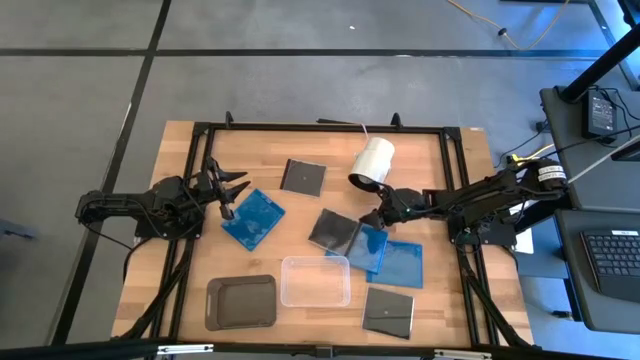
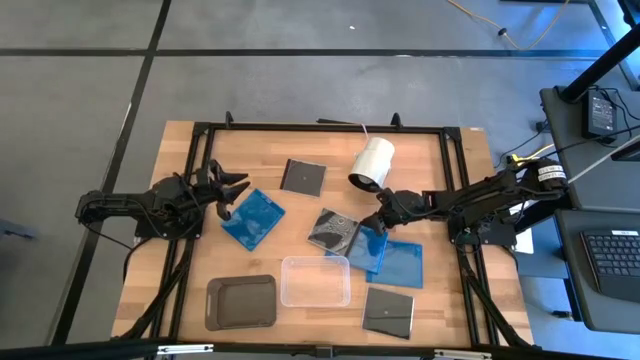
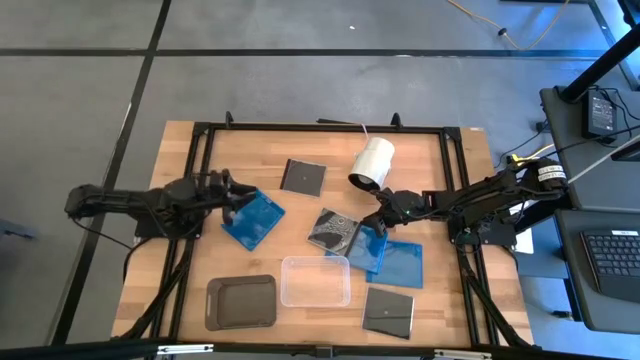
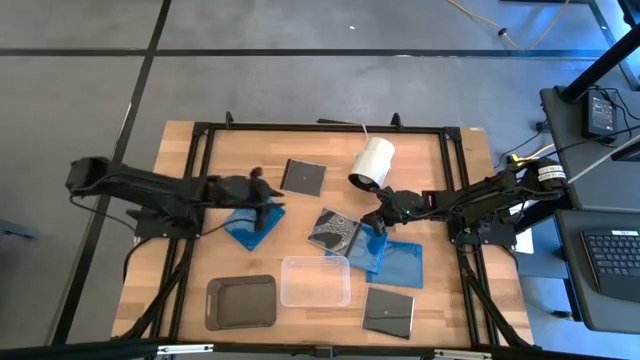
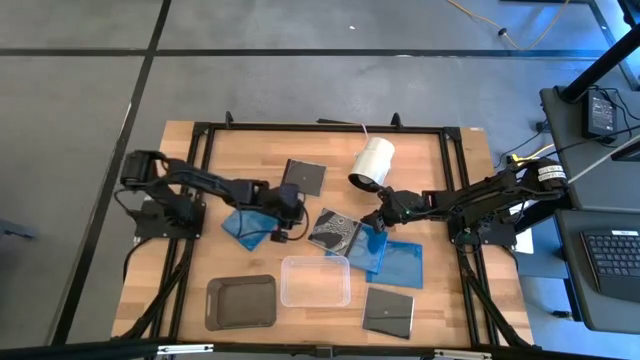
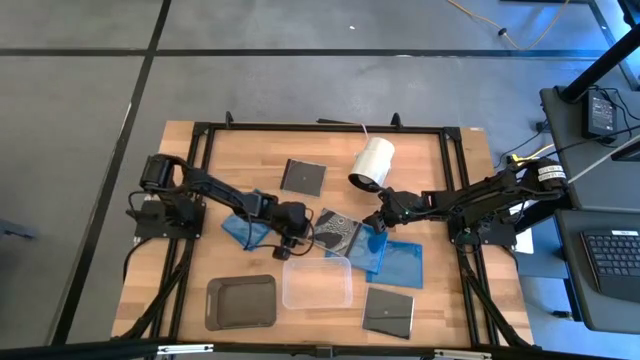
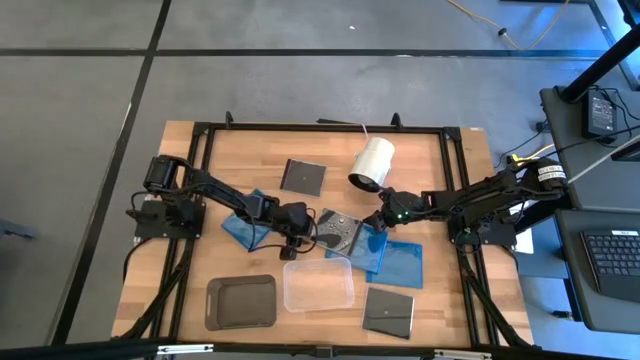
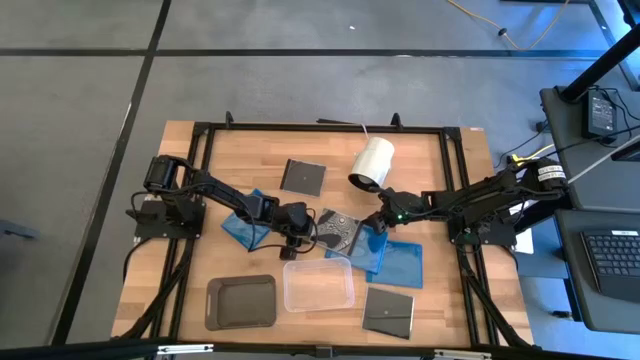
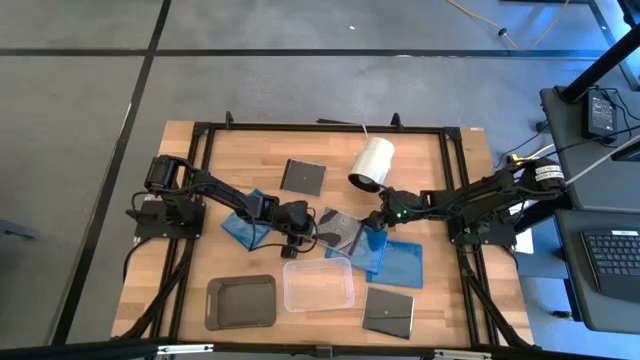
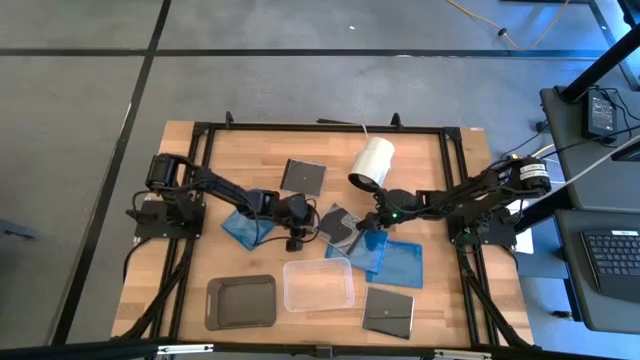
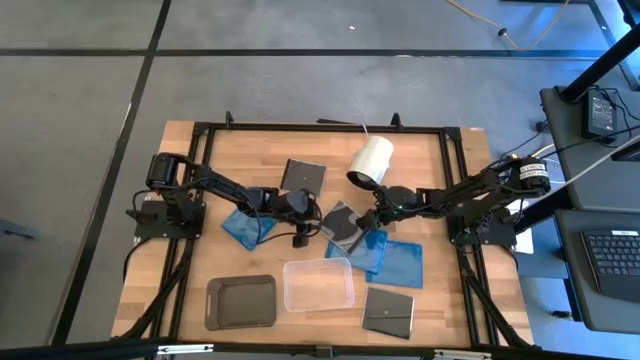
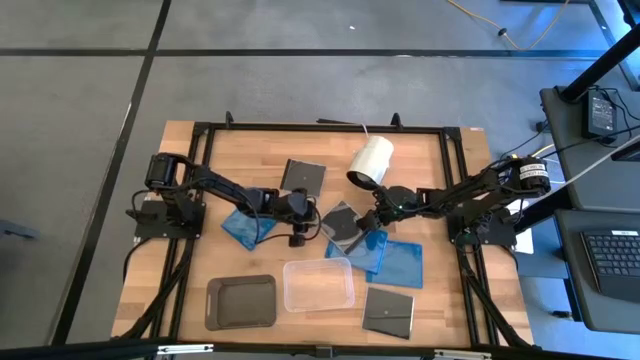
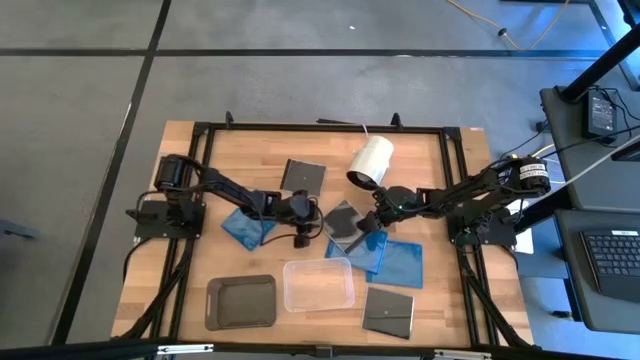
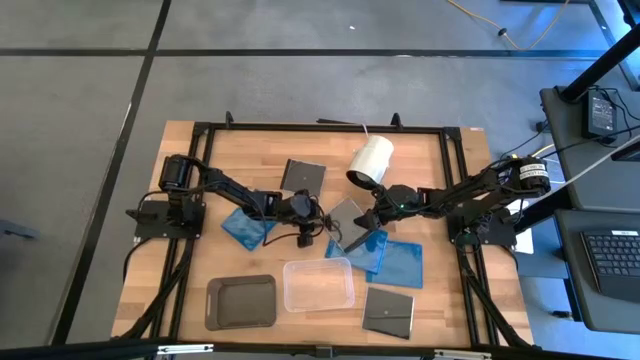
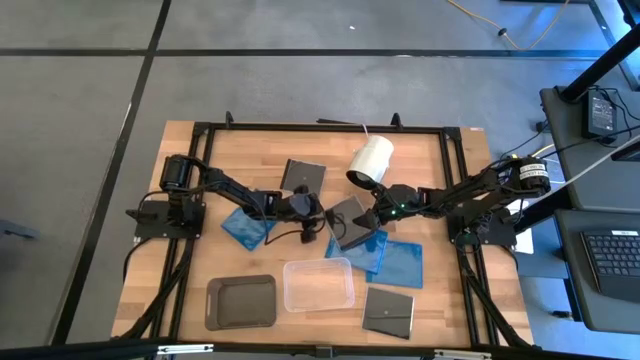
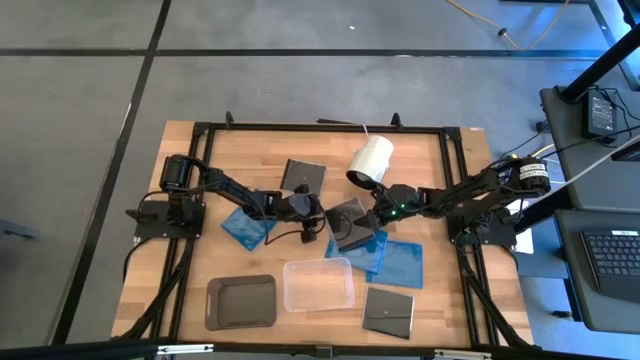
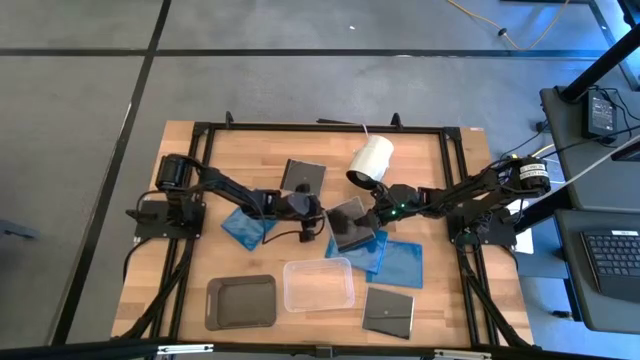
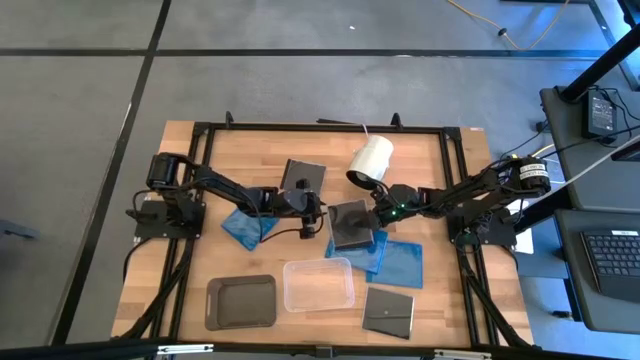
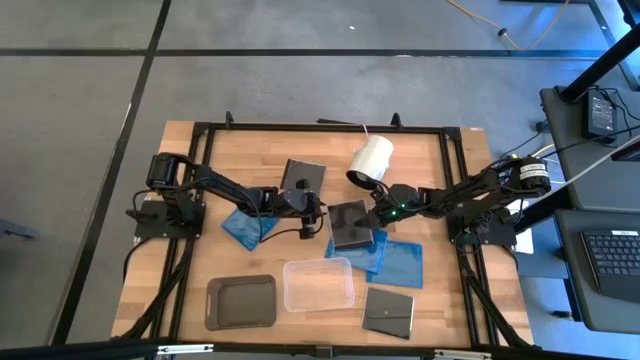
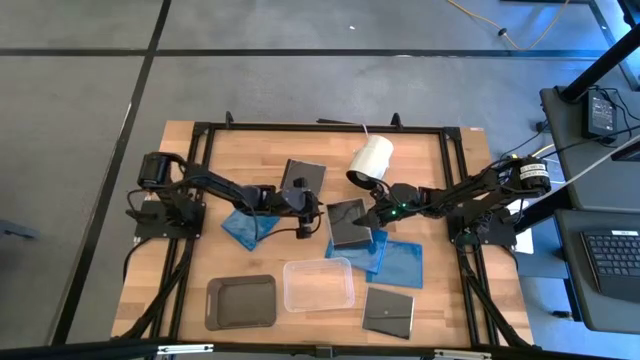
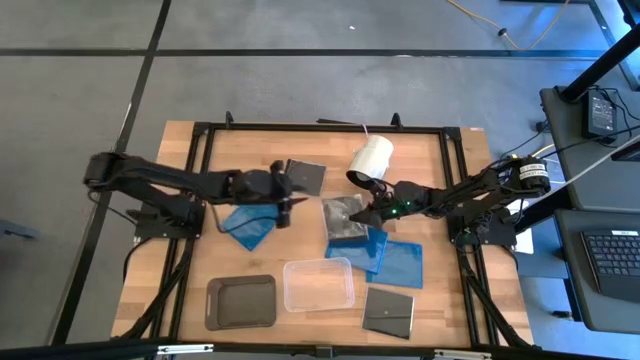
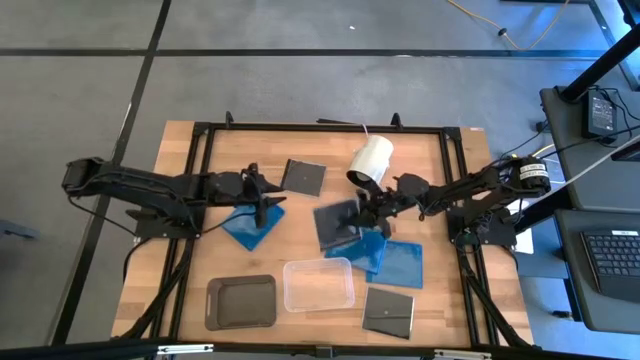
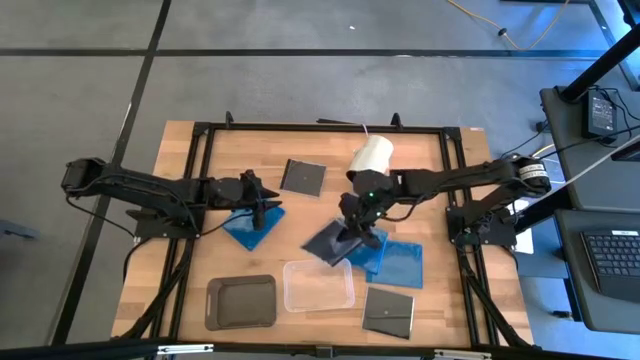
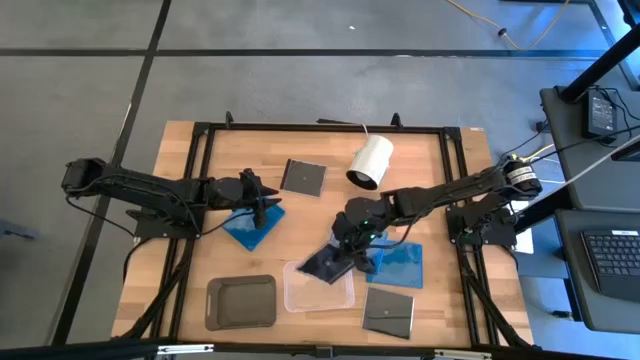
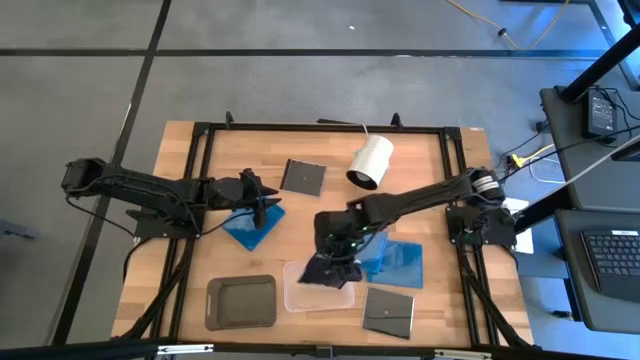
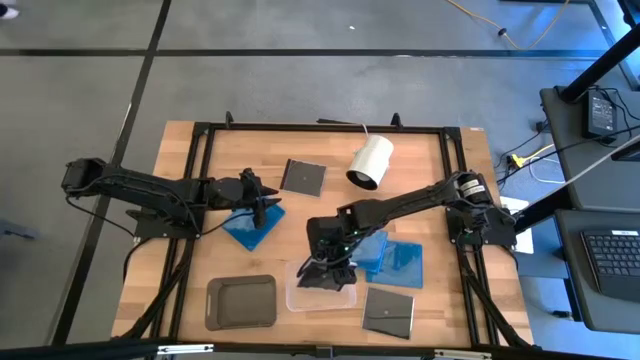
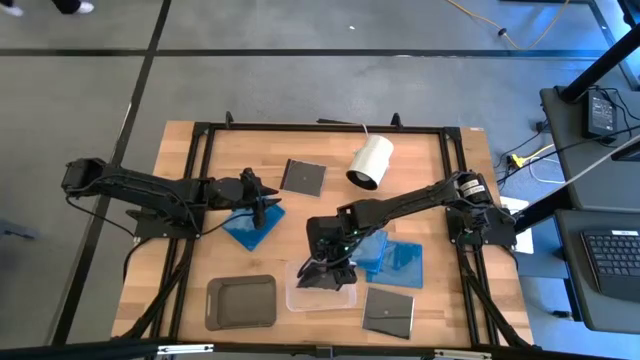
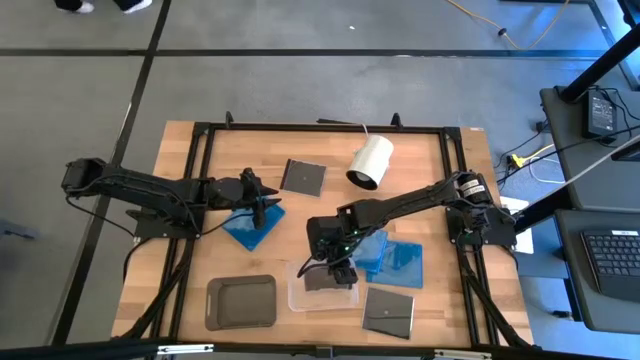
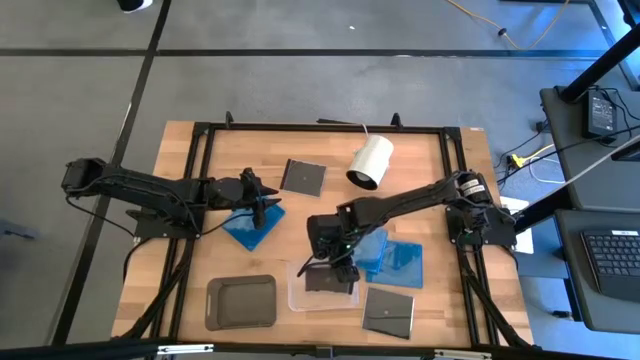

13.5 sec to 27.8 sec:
Task: Pick & place jewel cases by type
Put the middle black CD case into the transparent bin

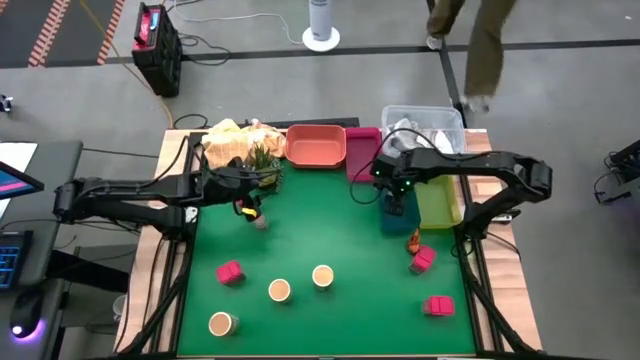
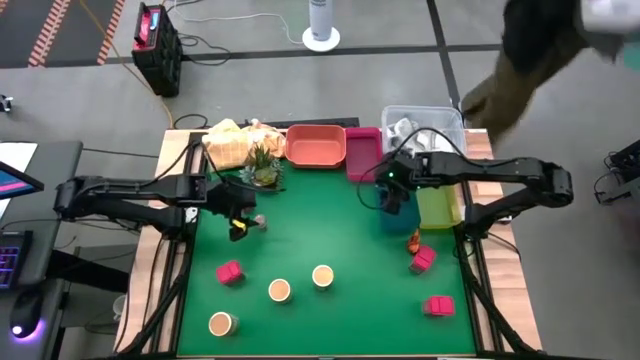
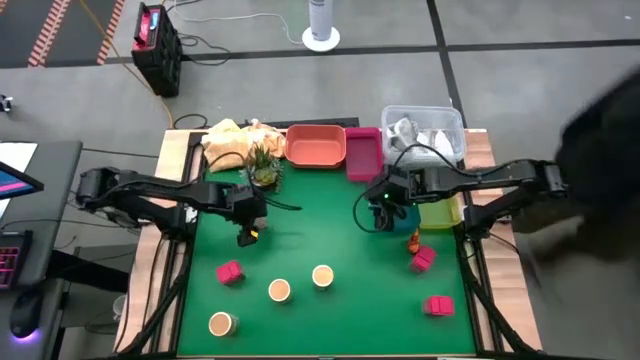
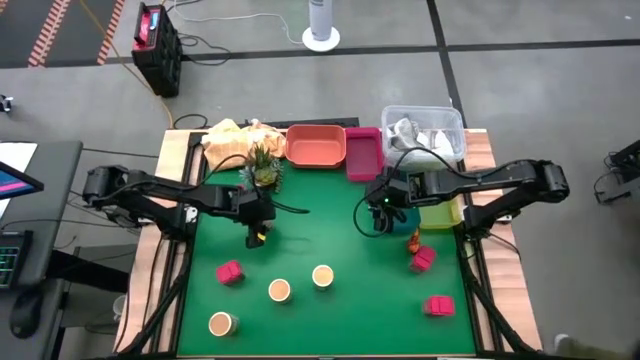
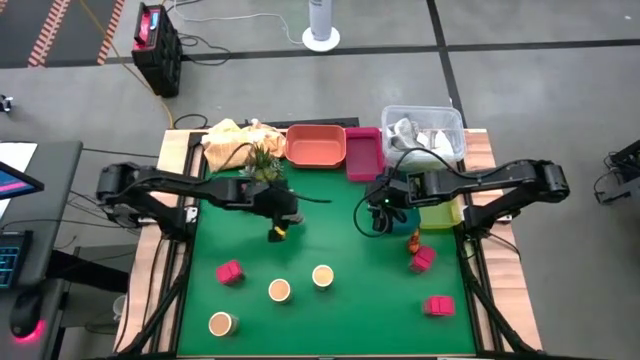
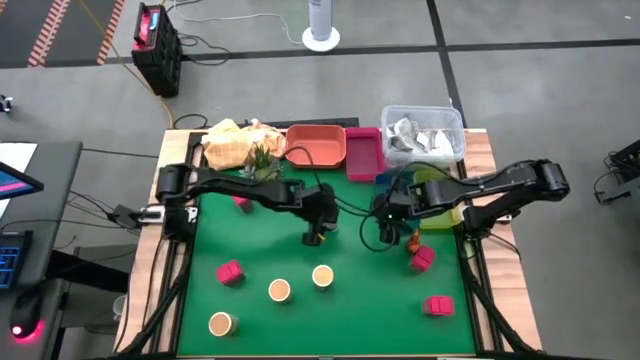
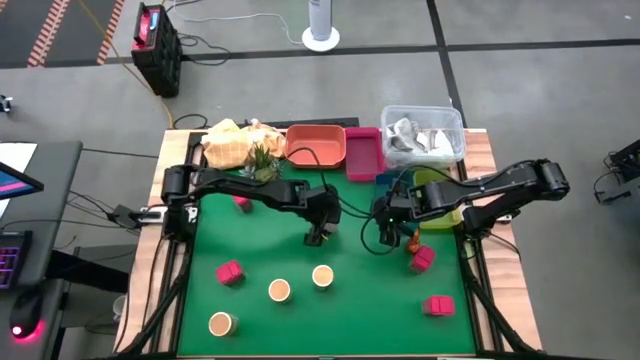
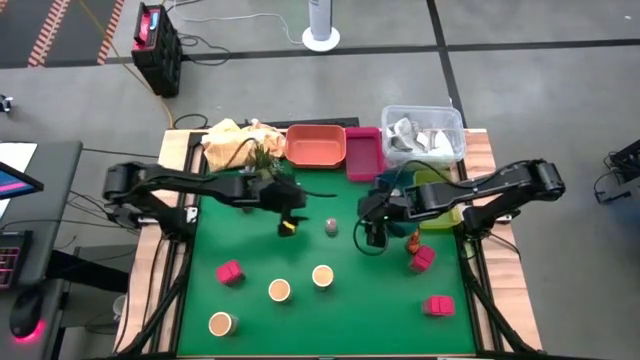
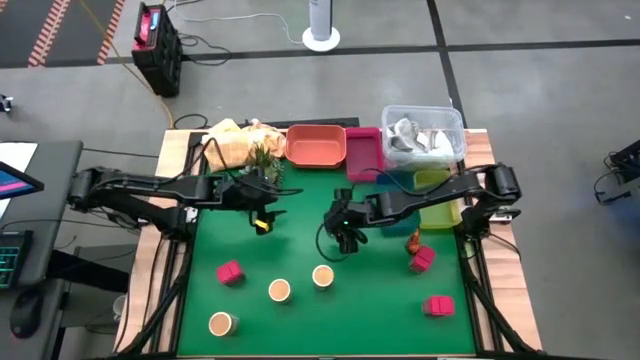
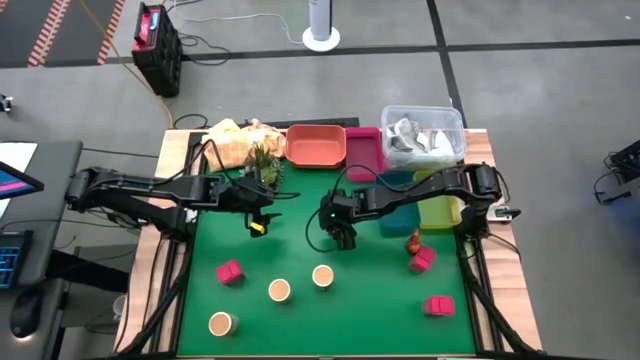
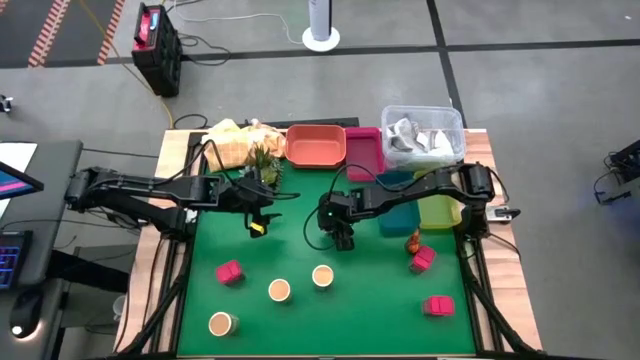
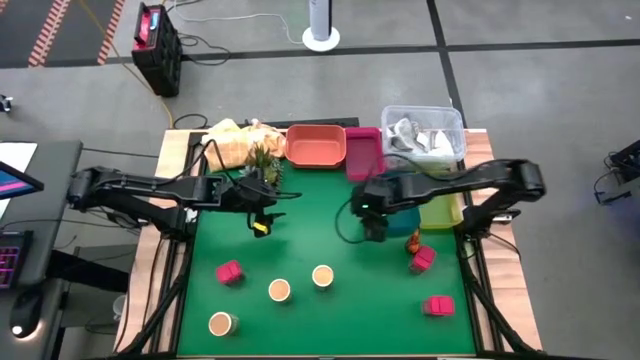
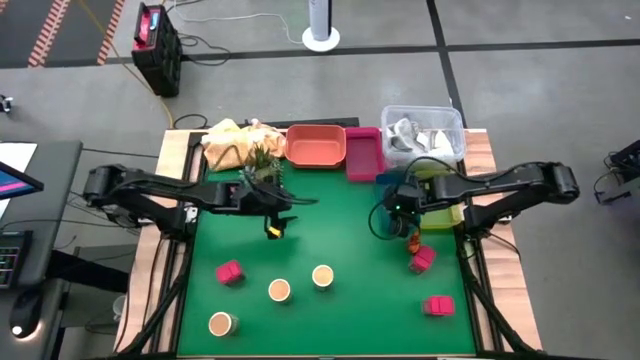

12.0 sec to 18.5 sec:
Task: Sort spices by type
Put the brown seasoning bottle into the blue bin

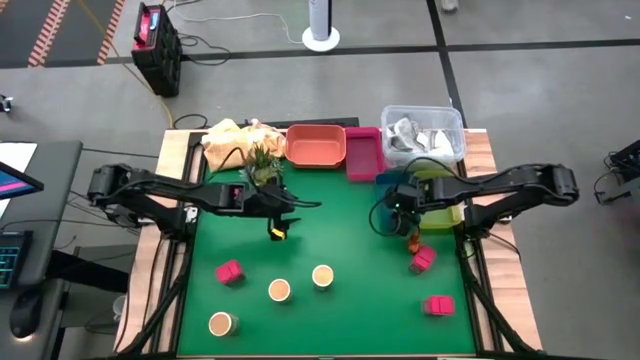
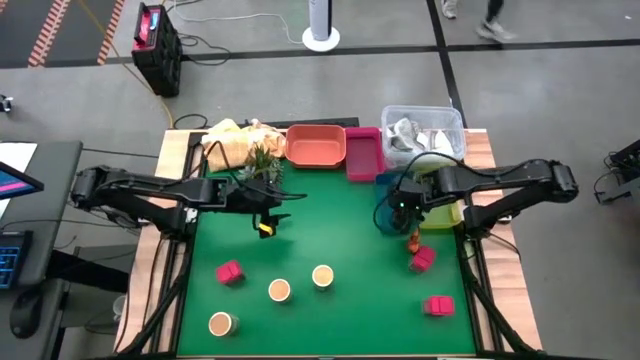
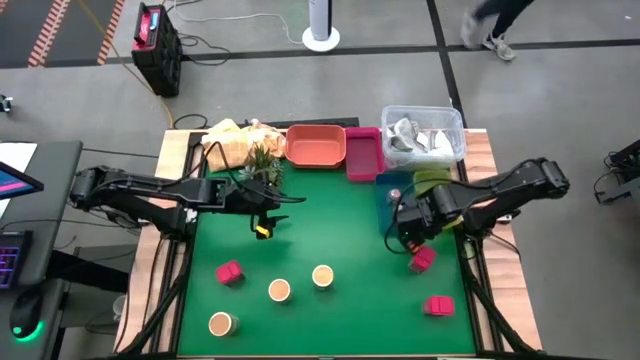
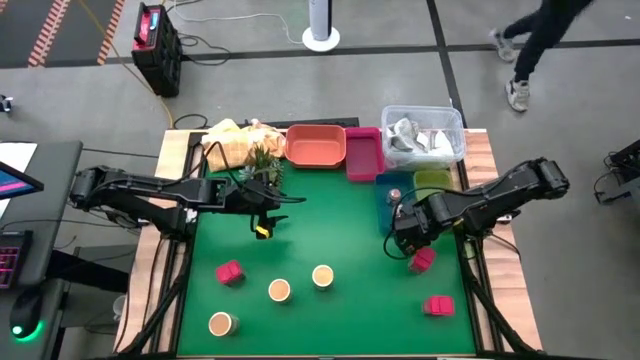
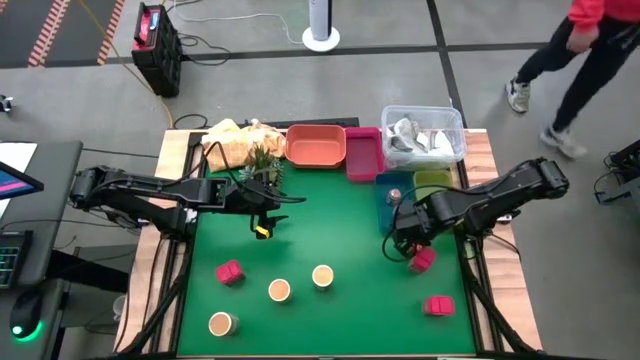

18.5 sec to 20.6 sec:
Put the orange seasoning bag into the yellow bin
